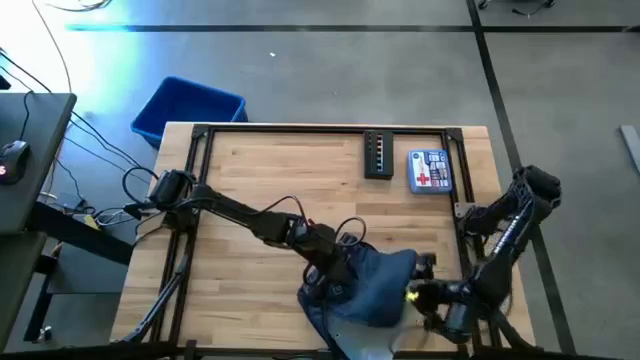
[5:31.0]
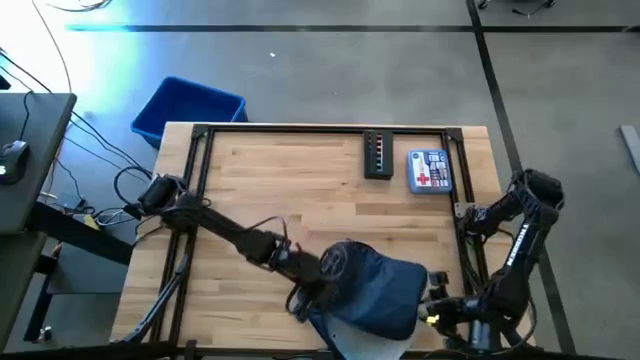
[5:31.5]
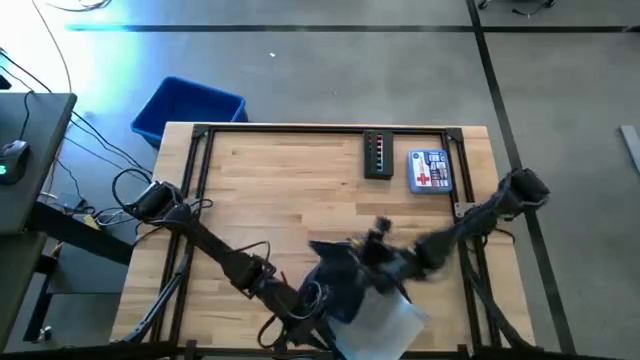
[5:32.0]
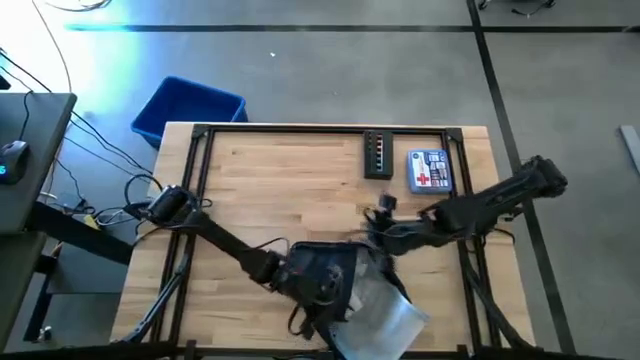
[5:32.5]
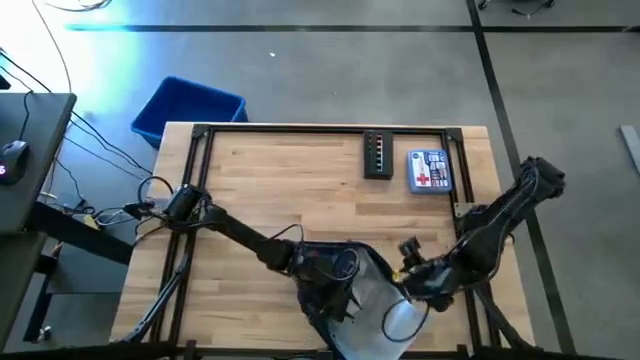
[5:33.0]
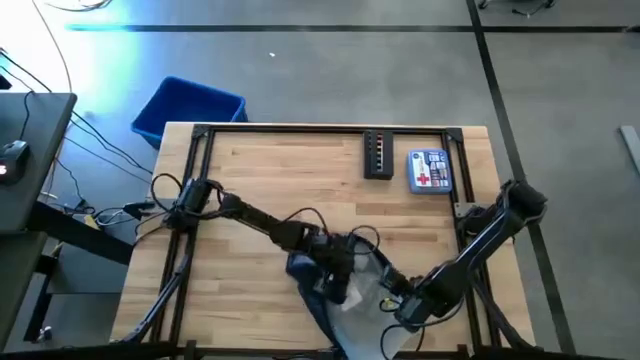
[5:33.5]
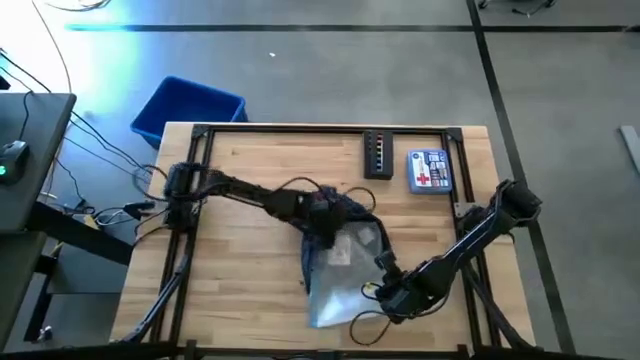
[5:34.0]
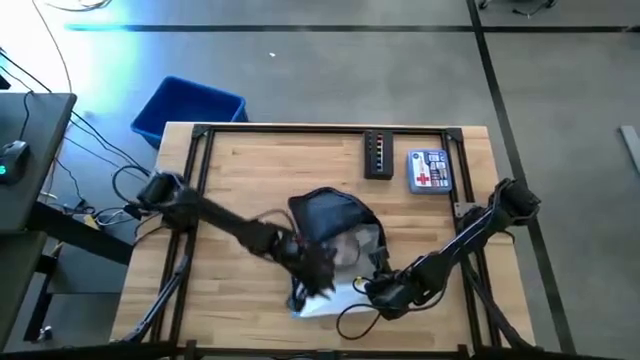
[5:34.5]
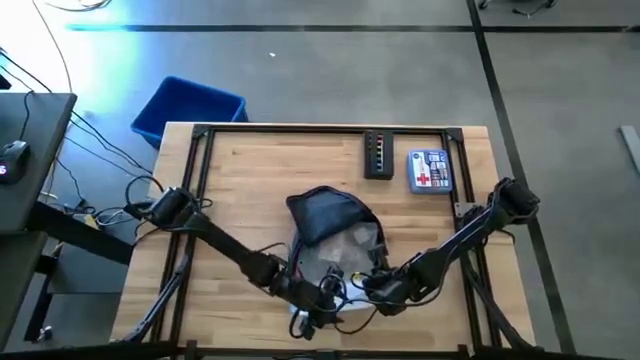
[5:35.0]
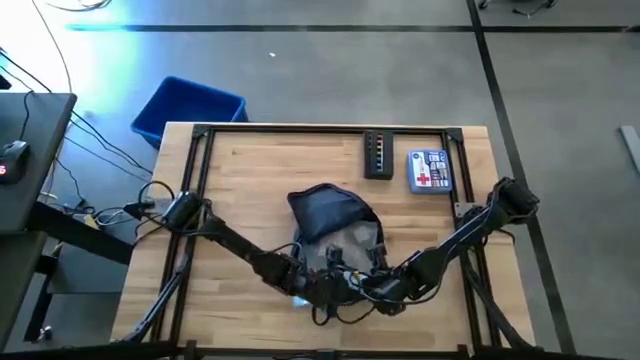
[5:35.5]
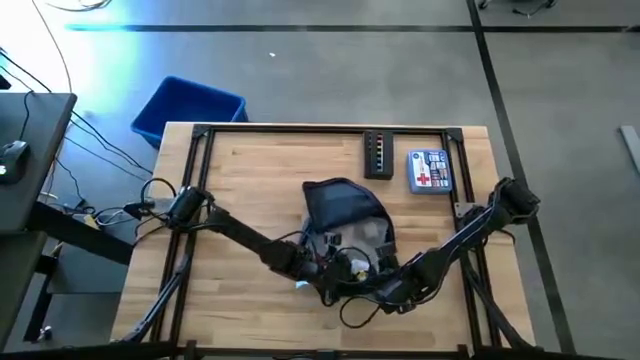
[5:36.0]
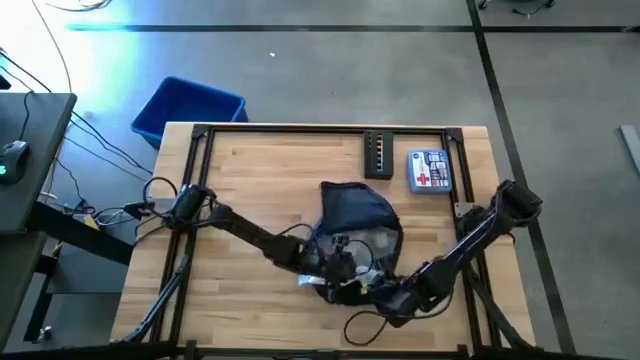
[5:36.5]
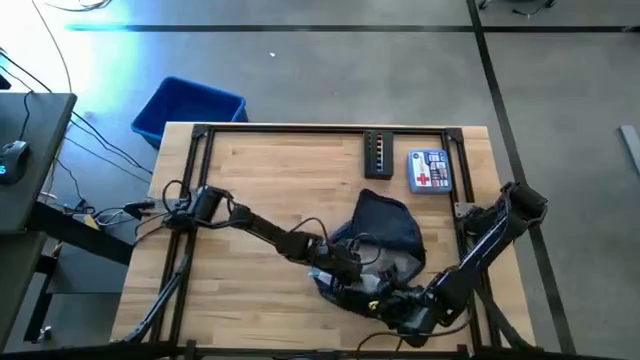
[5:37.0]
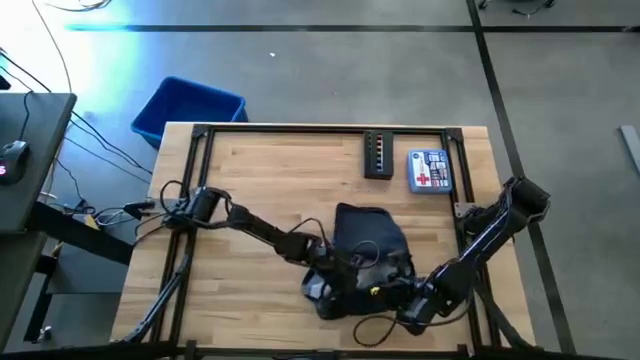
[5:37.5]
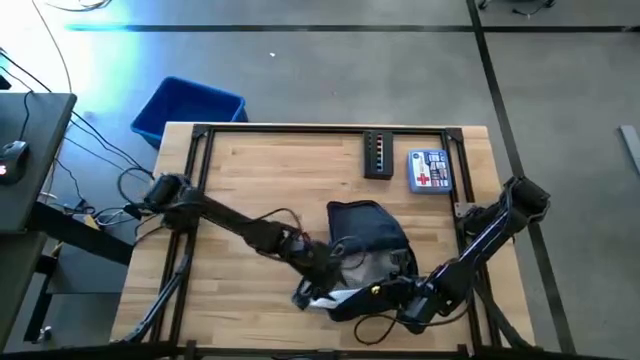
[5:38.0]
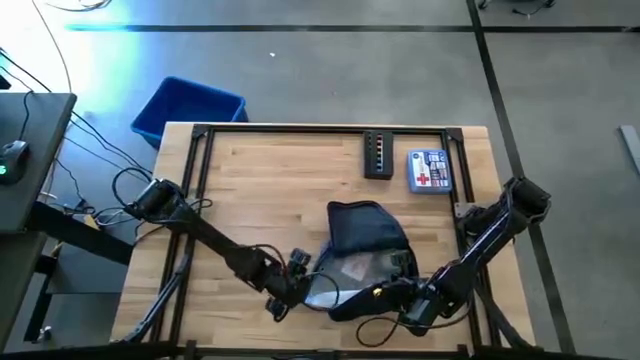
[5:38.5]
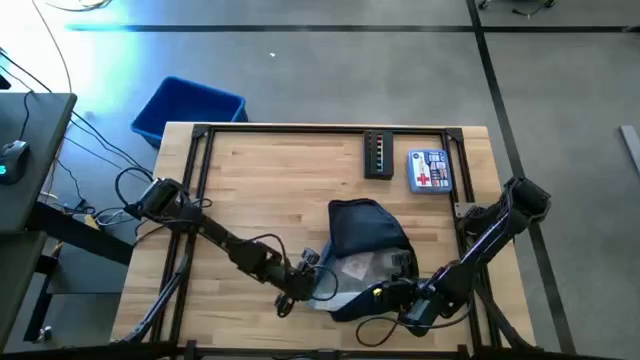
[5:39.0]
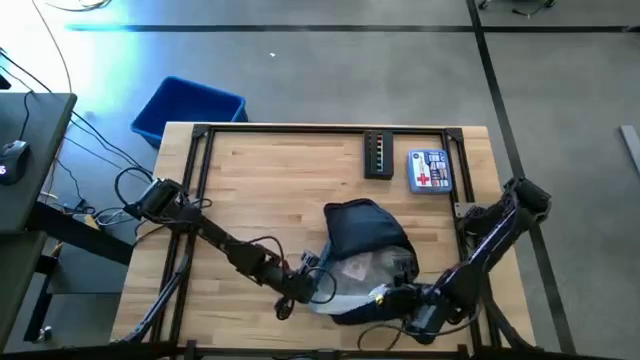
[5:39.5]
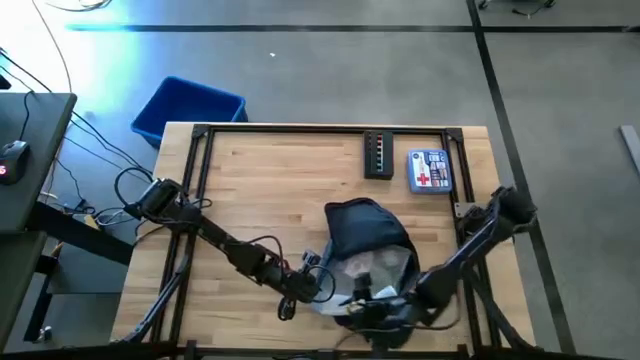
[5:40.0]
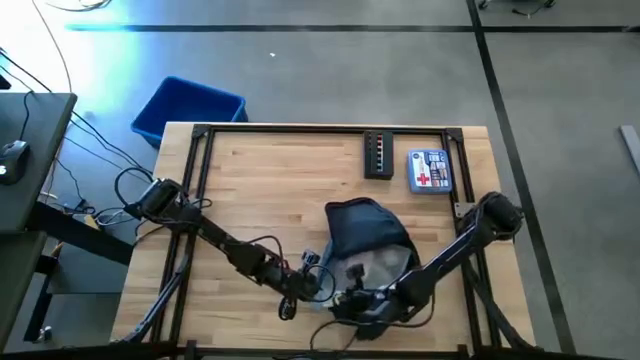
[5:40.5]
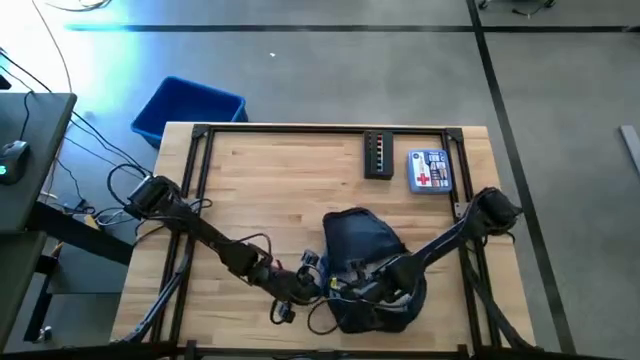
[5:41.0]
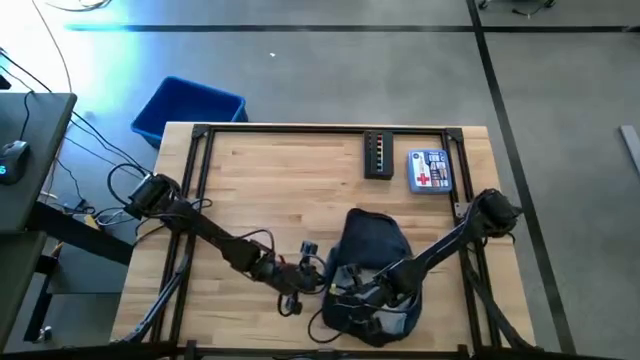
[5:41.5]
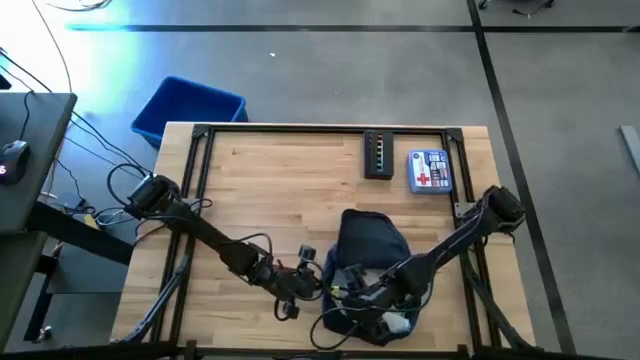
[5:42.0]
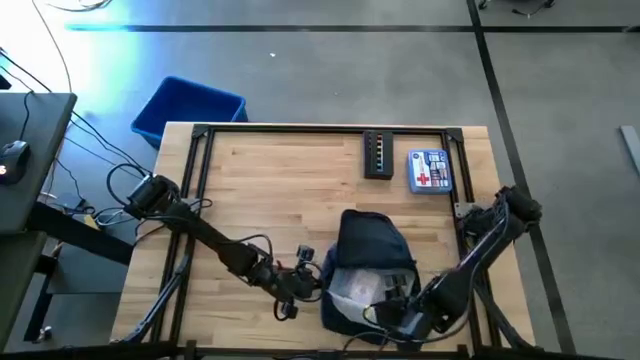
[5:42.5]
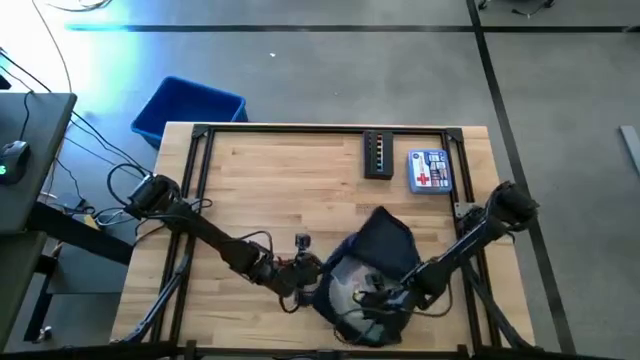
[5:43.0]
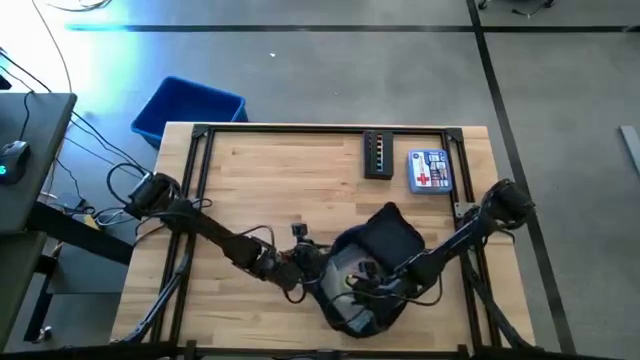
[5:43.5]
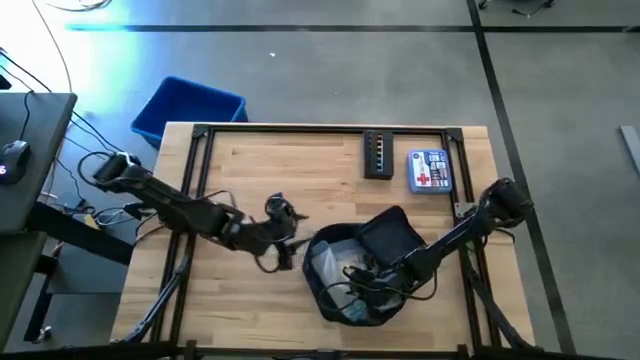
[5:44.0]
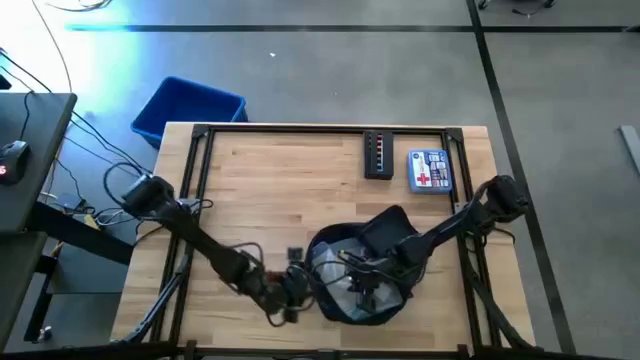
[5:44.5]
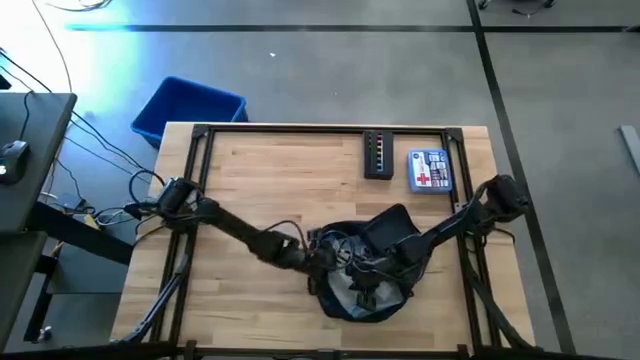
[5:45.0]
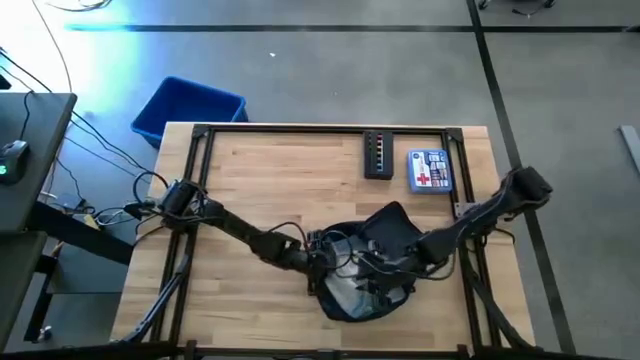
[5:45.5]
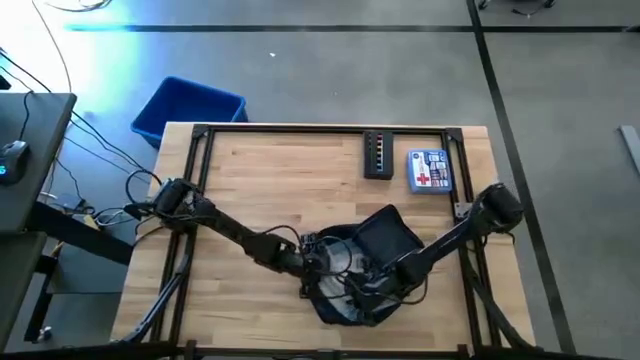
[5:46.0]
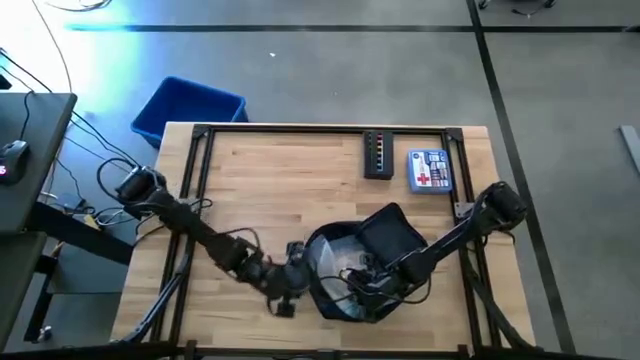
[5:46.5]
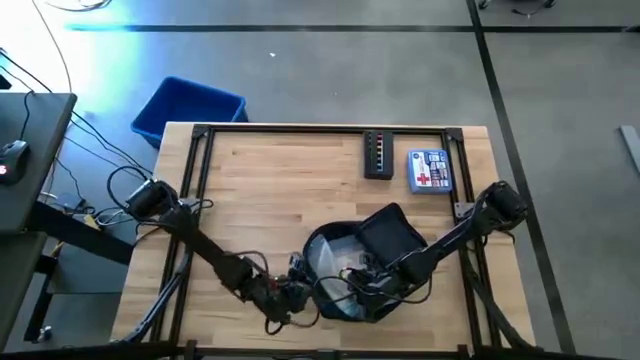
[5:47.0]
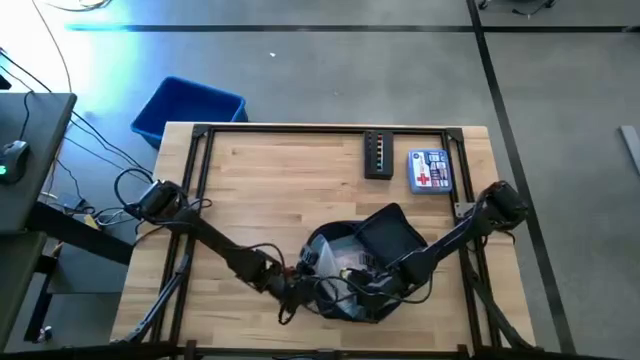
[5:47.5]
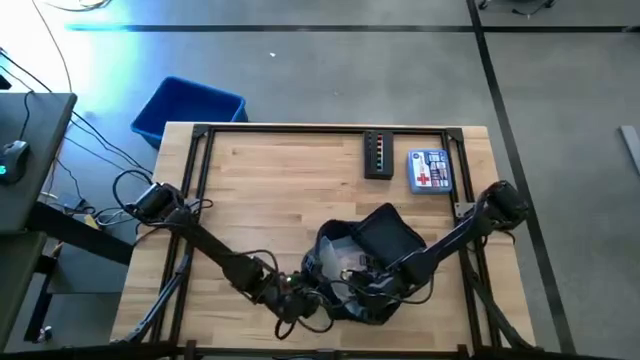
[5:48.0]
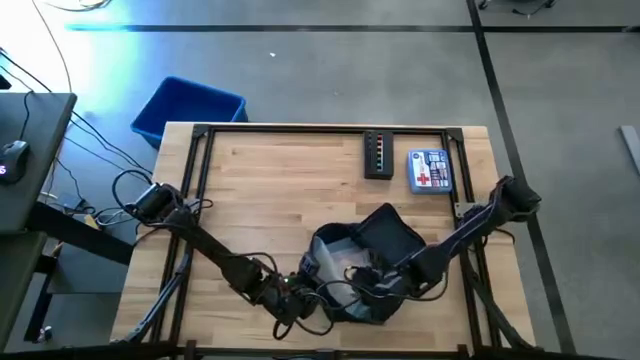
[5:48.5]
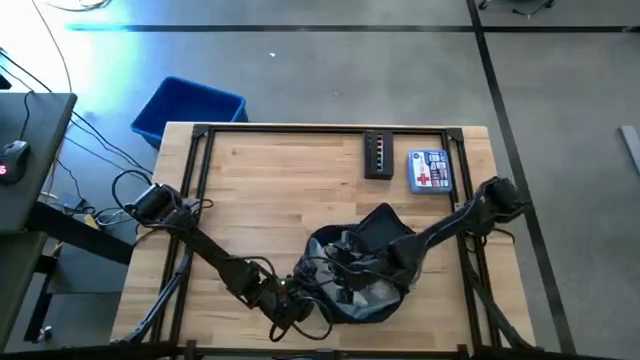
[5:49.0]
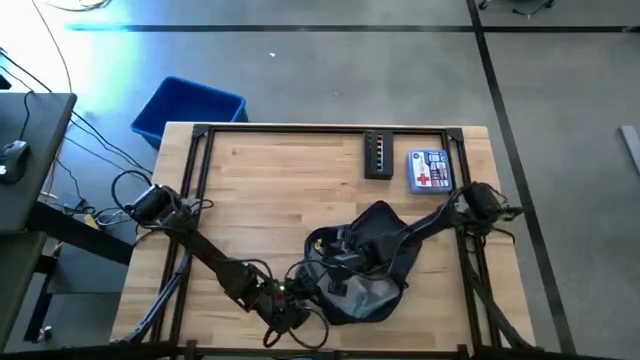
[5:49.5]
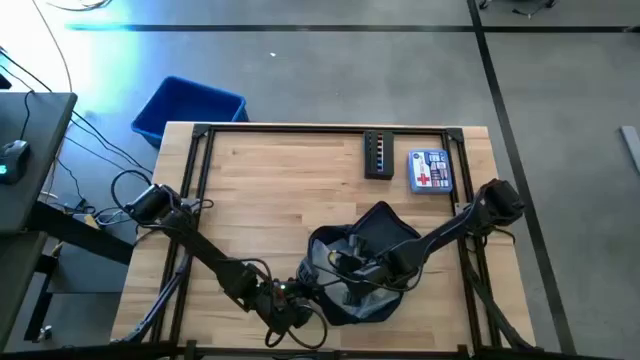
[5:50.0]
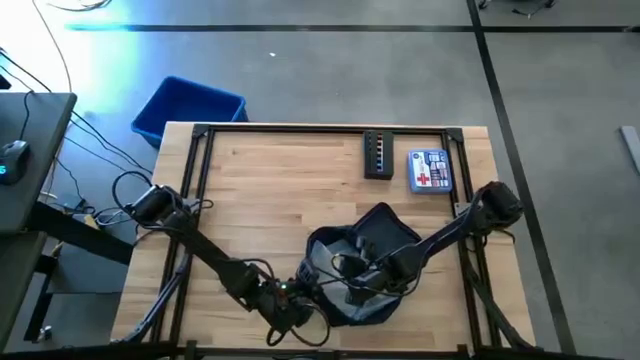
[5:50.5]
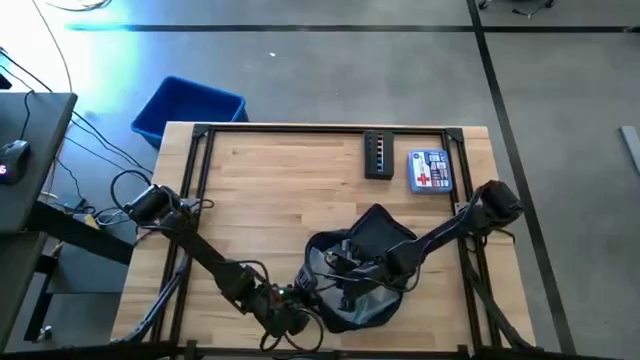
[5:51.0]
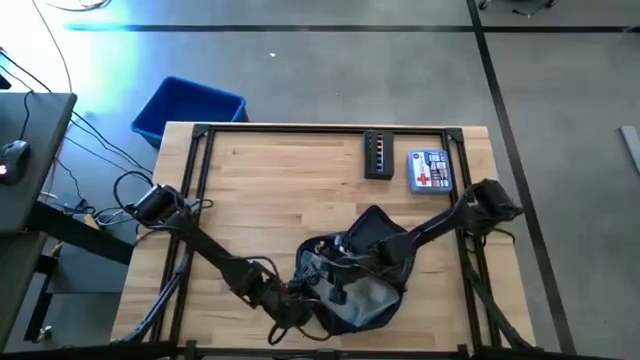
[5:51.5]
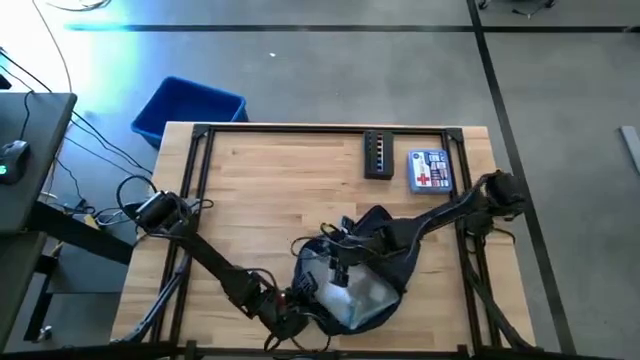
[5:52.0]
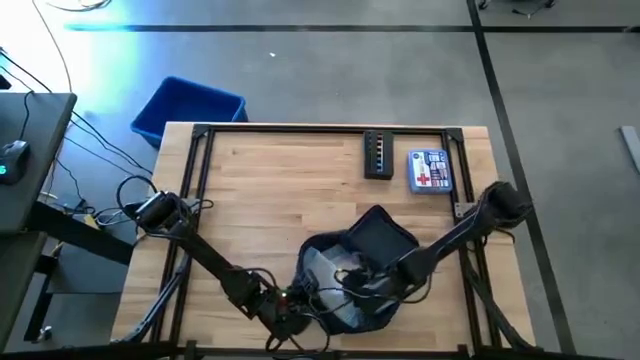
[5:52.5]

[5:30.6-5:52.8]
Task: Unpack backpack
Put the white zip bag into the backpack
